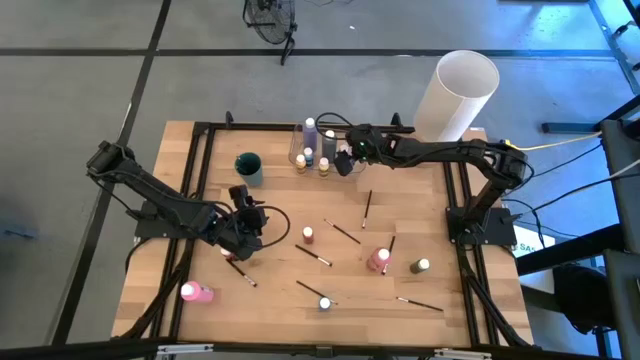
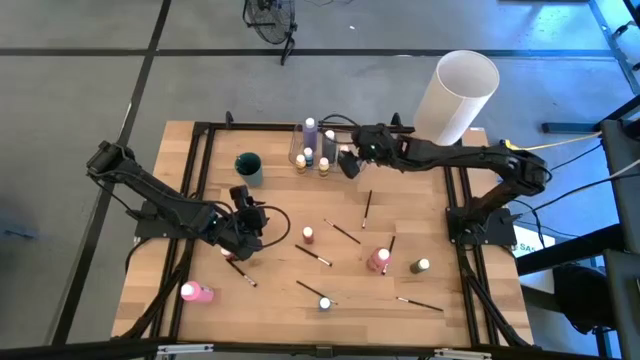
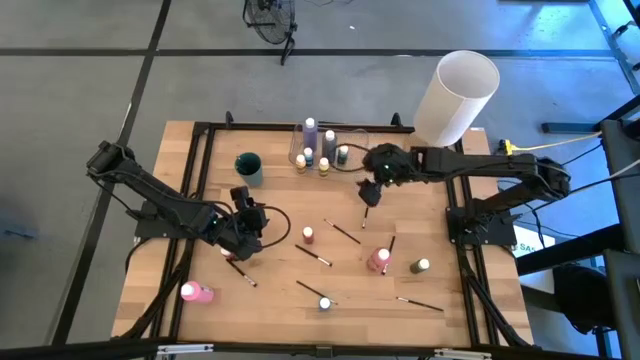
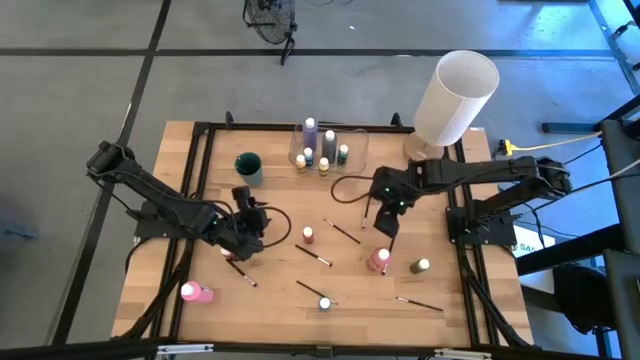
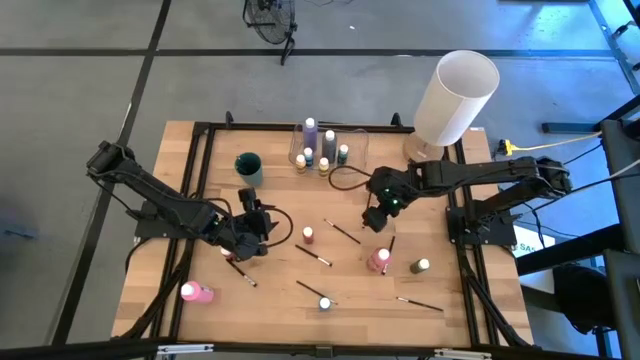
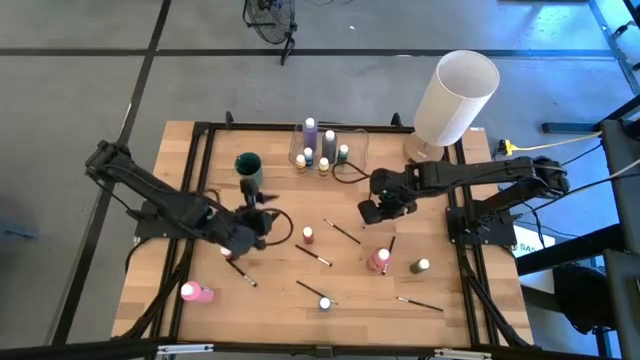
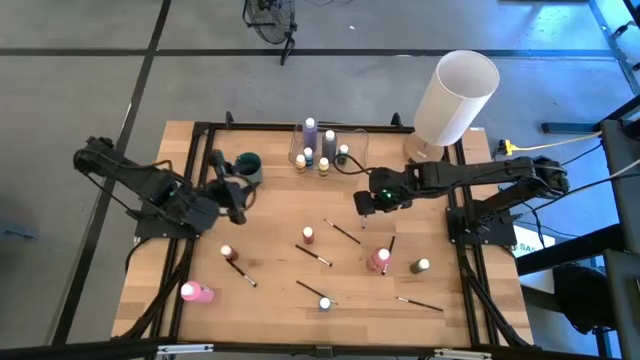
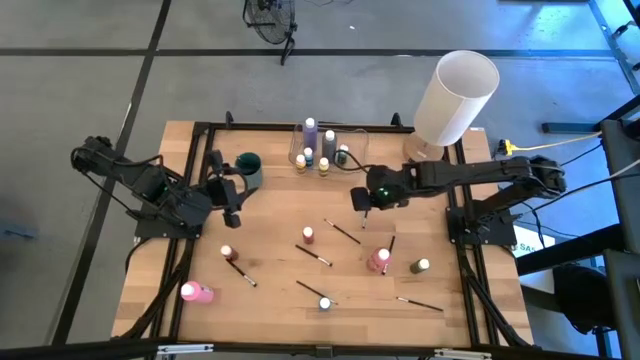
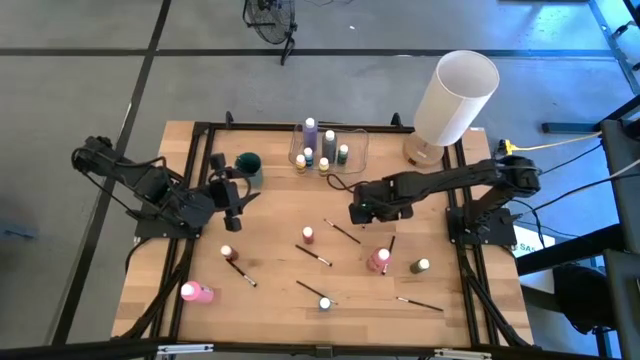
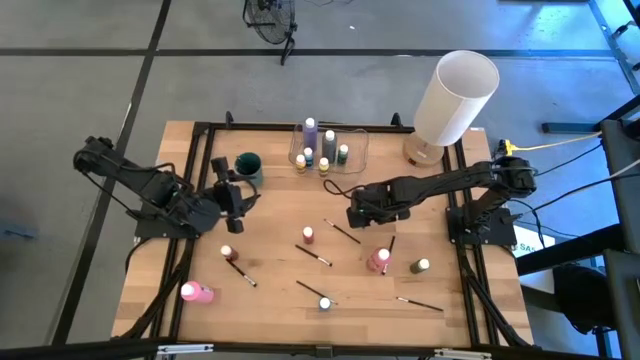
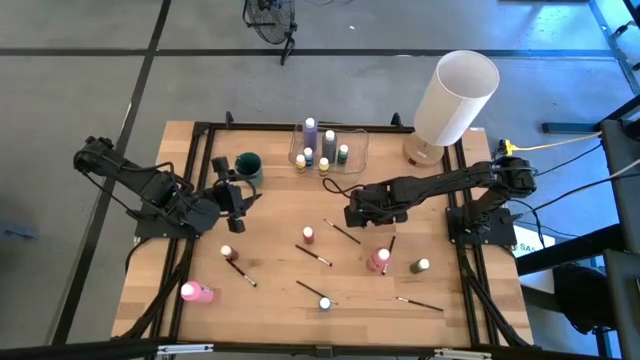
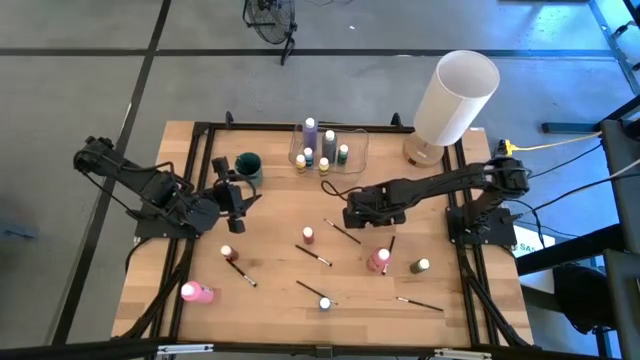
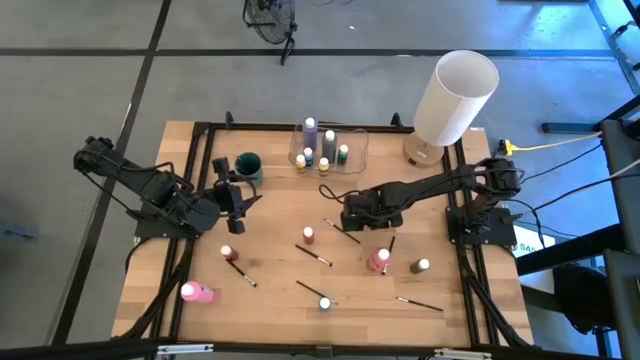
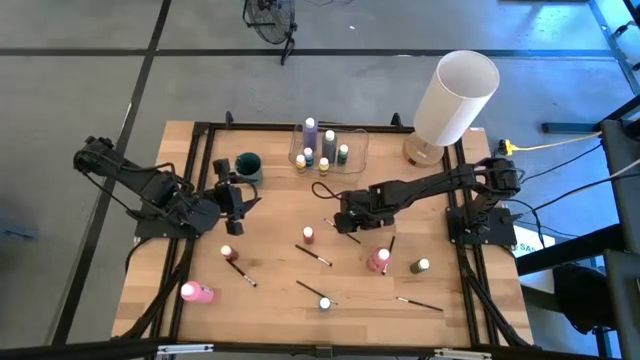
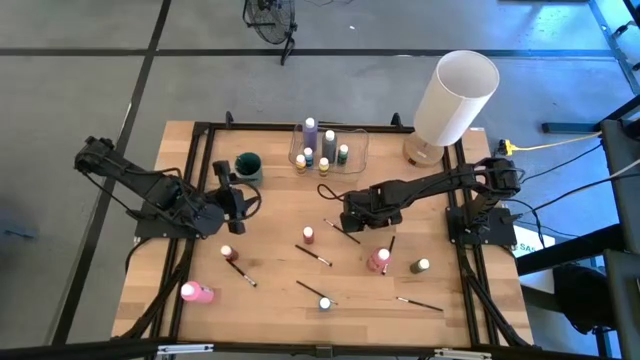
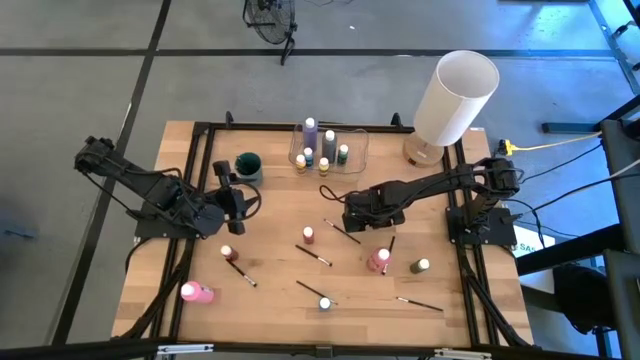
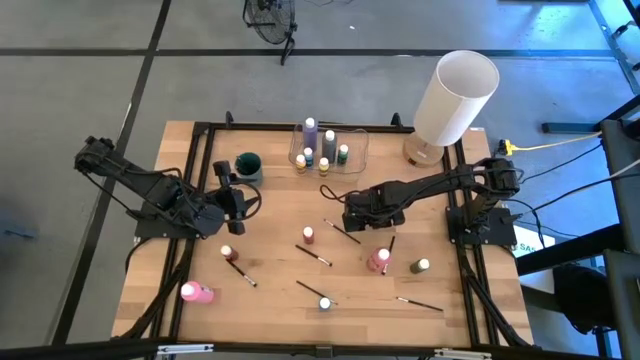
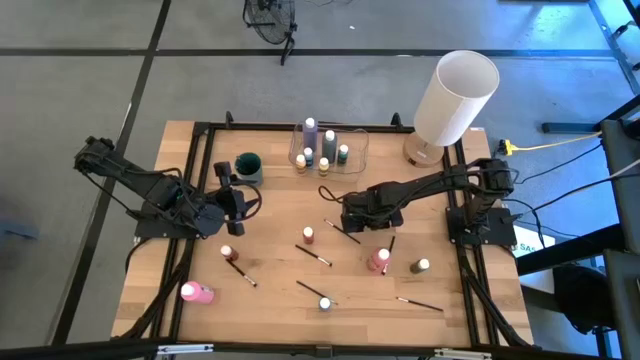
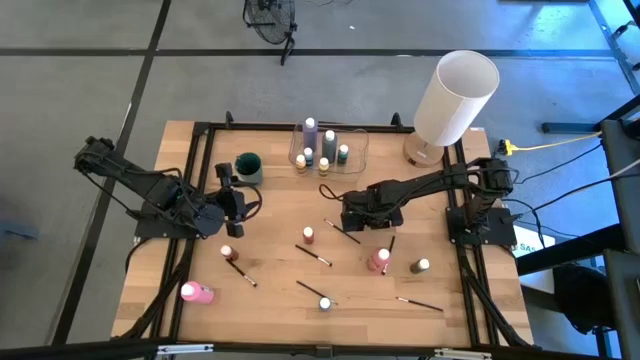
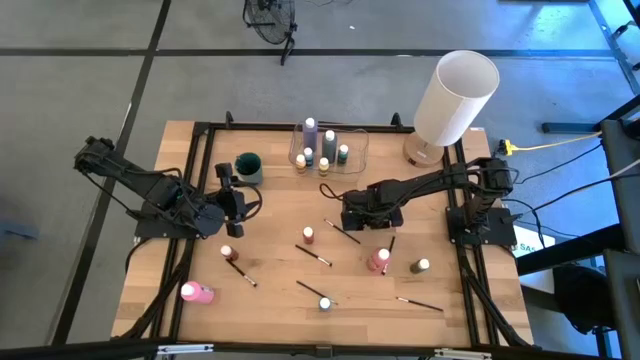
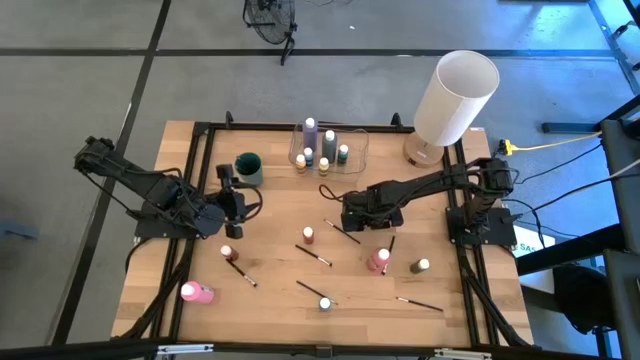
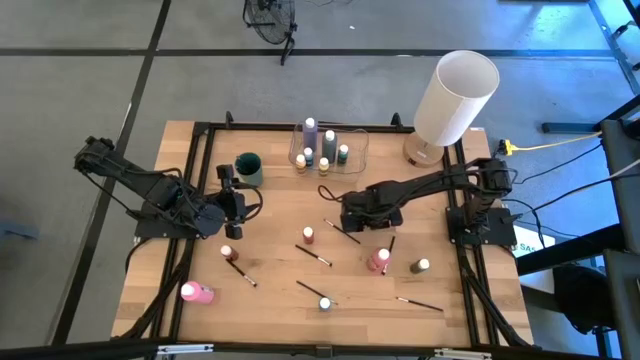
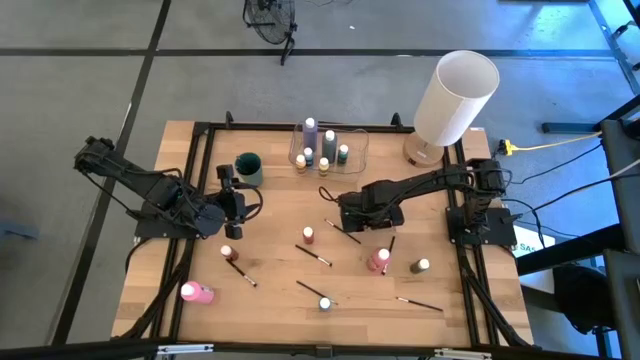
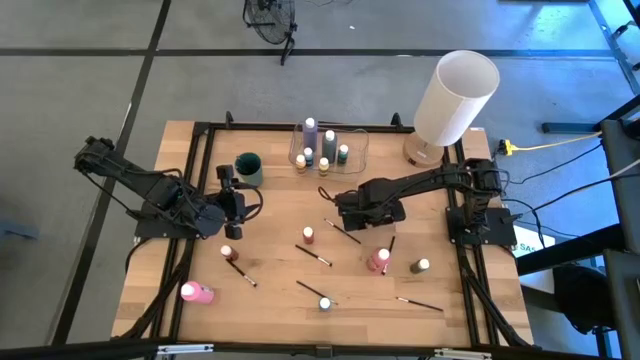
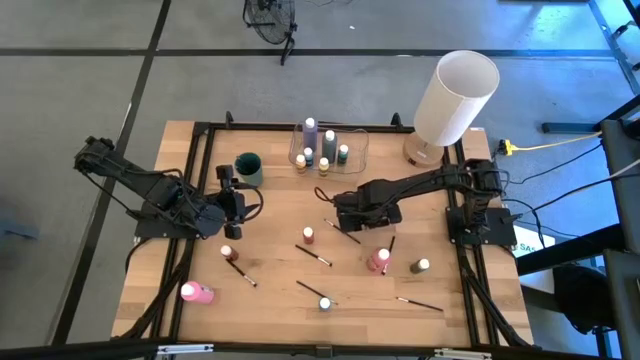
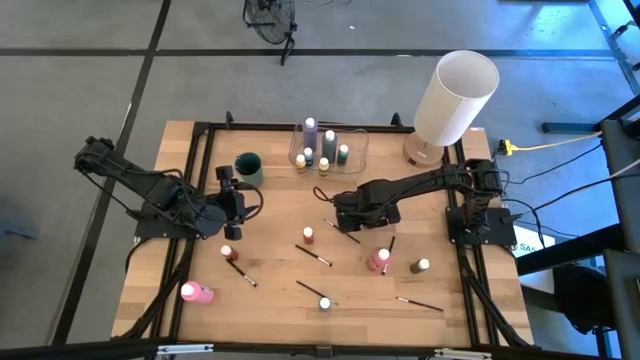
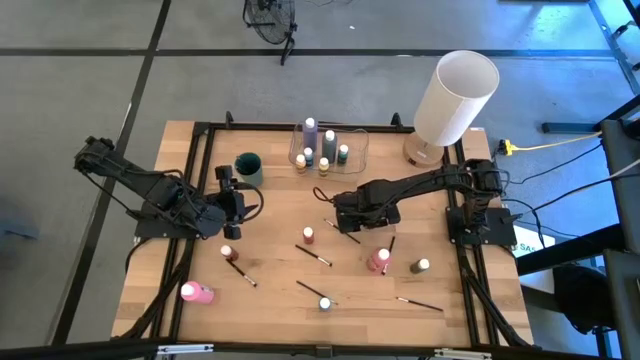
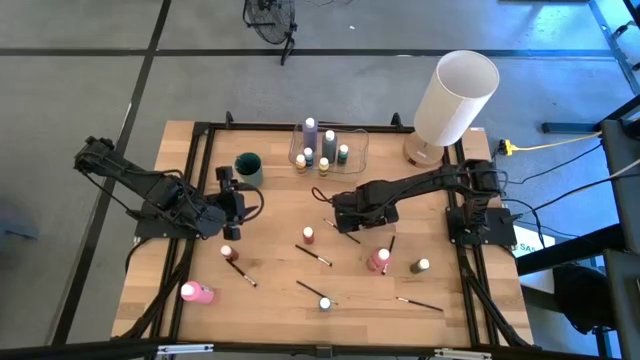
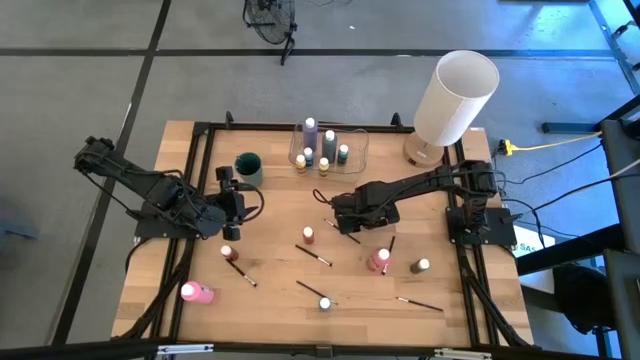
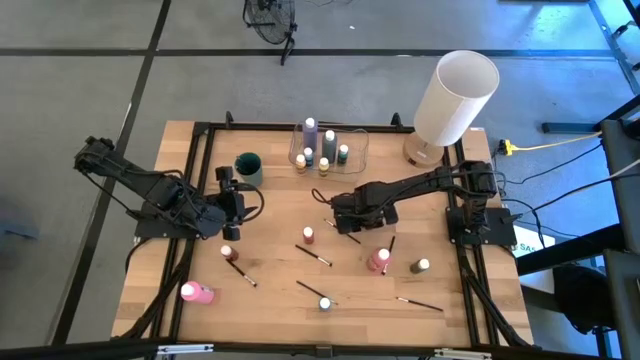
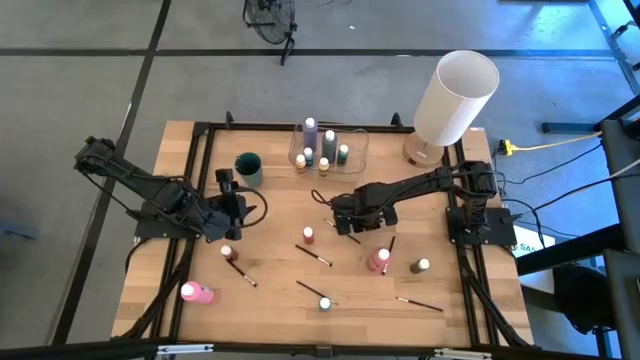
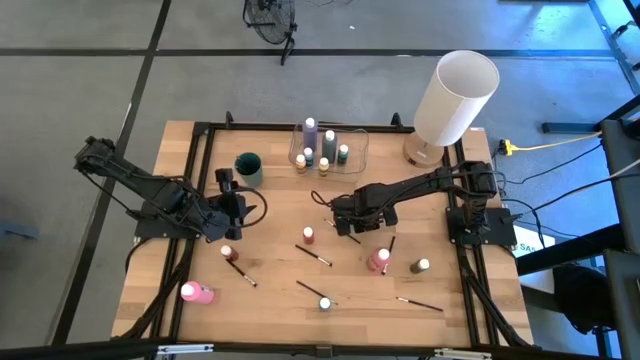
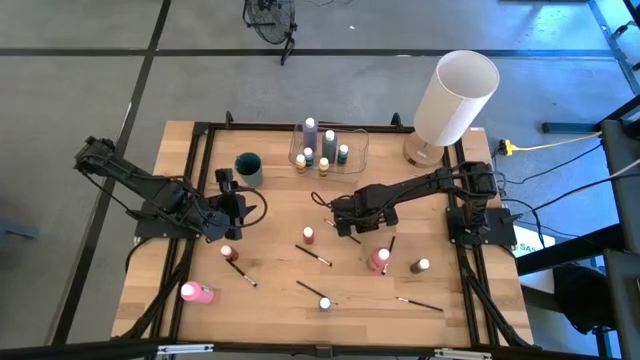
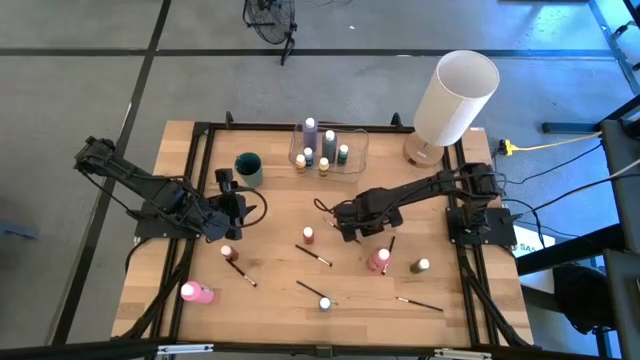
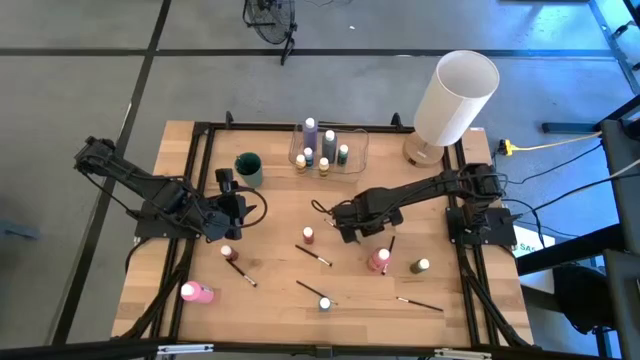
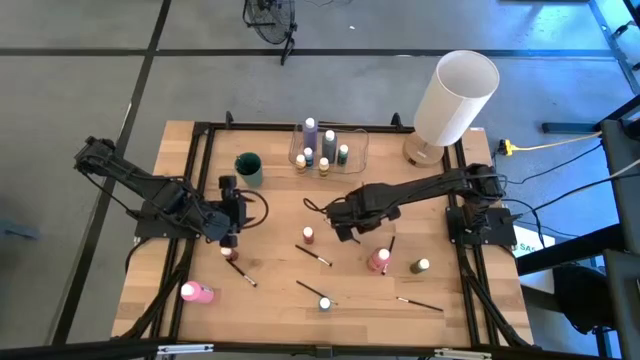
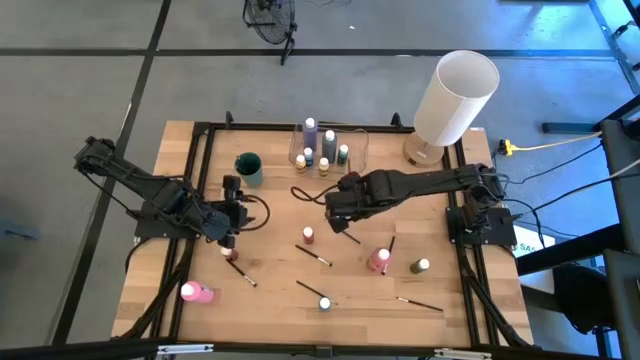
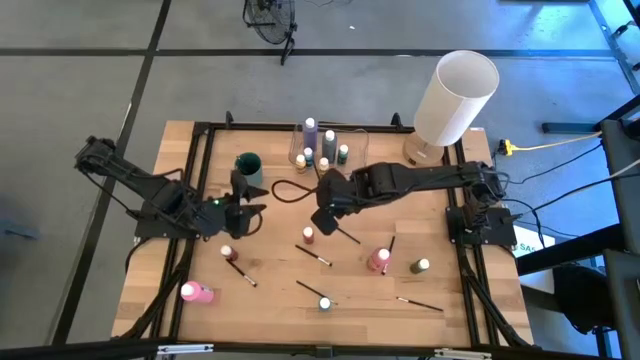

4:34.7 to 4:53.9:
Task: Pick & Place Paint Supplies
Put the silver paint brush into the green cup

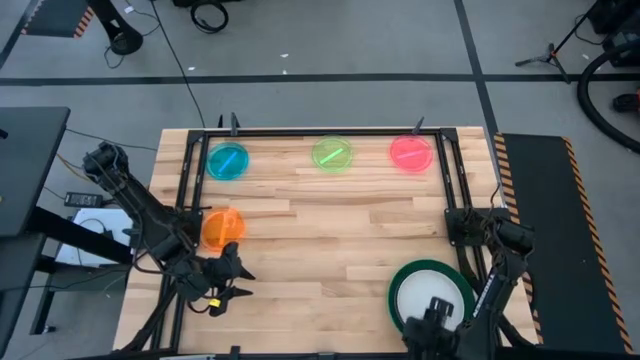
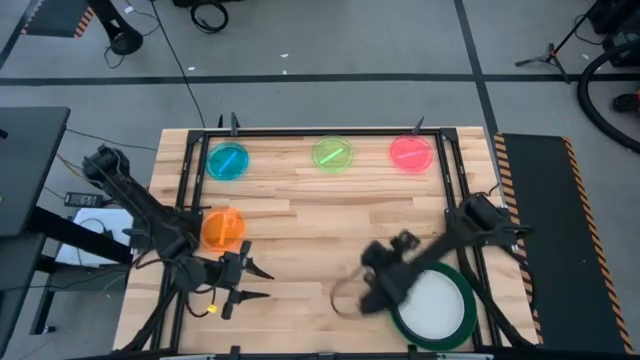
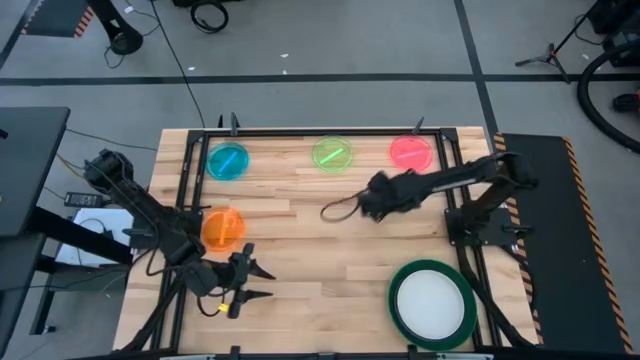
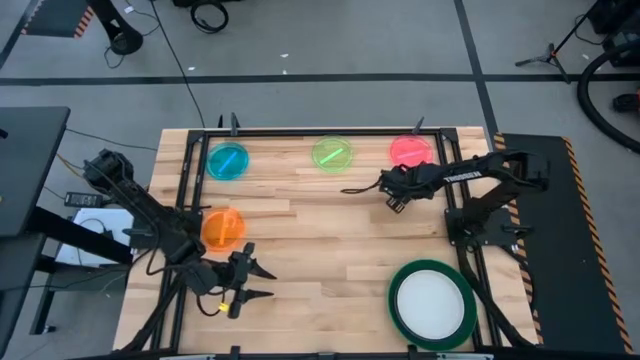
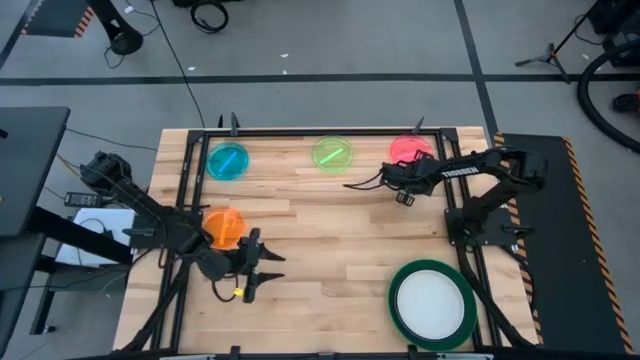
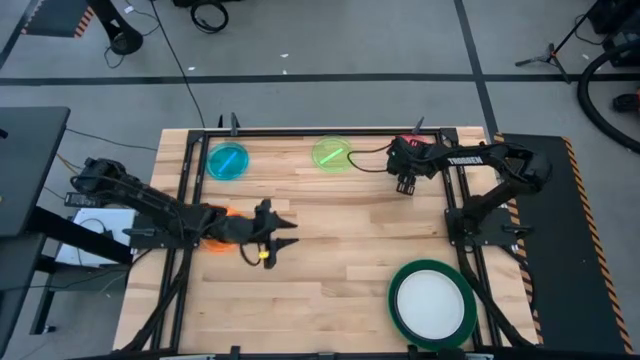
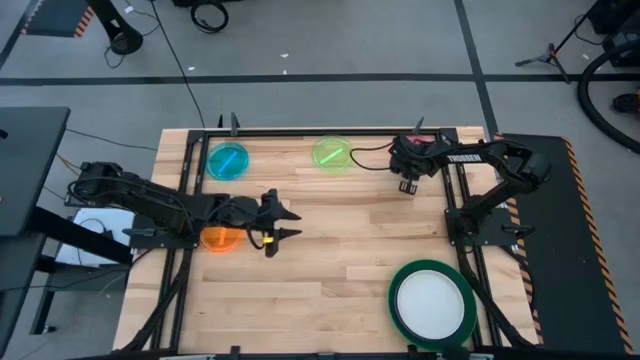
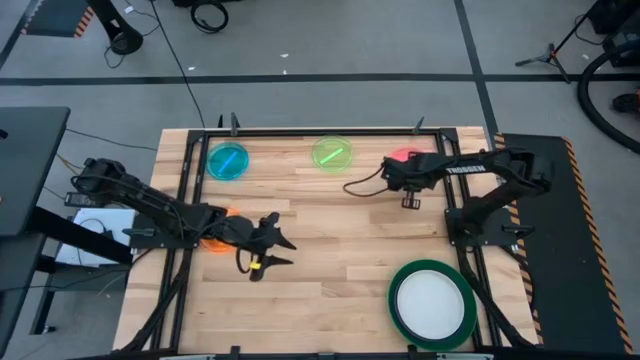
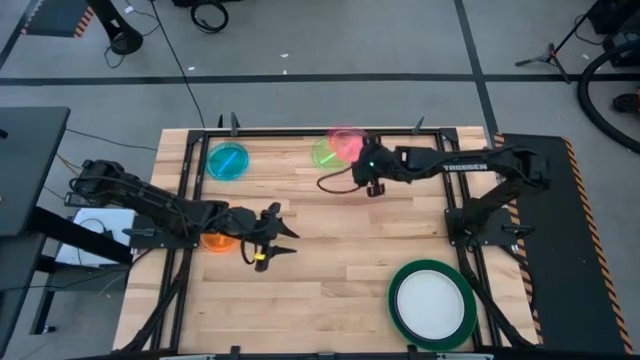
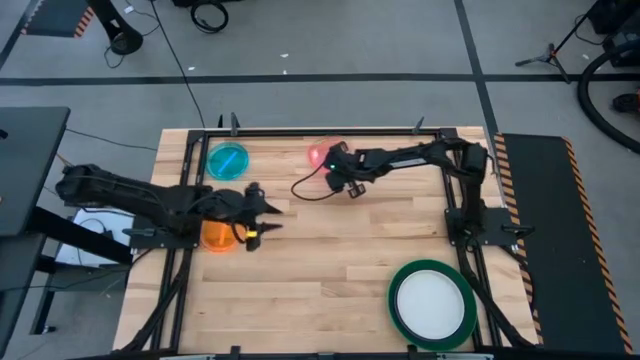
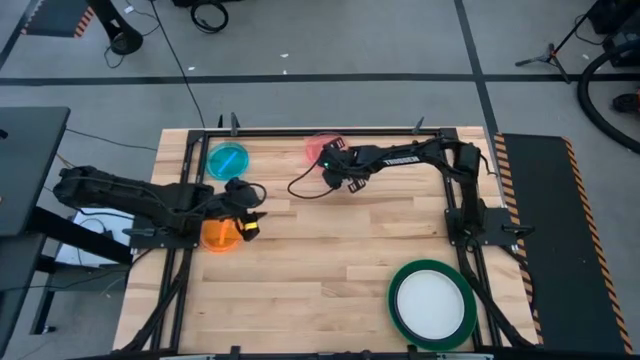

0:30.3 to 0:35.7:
Task: Stack plastic plates
Stack the pink transparent plate on top of the green transparent plate
